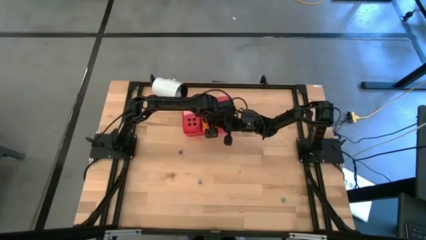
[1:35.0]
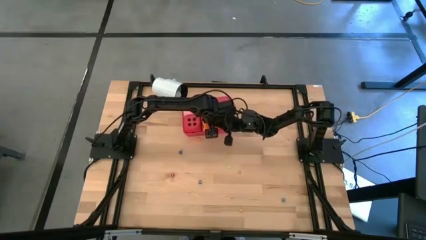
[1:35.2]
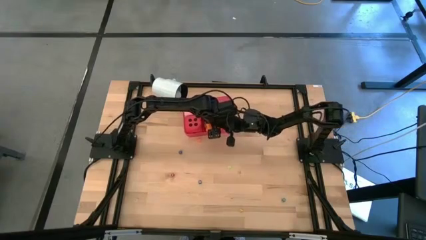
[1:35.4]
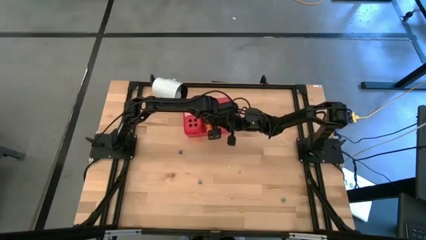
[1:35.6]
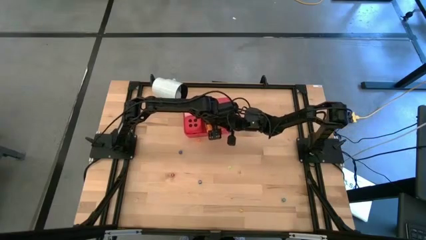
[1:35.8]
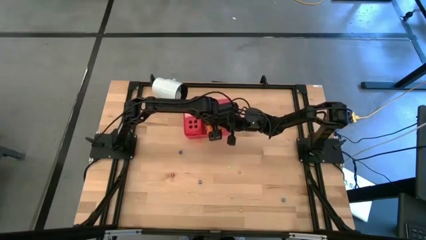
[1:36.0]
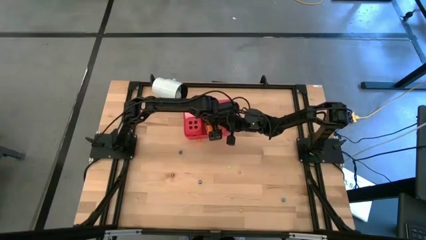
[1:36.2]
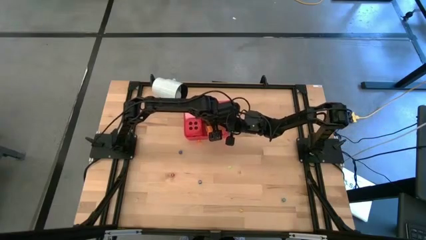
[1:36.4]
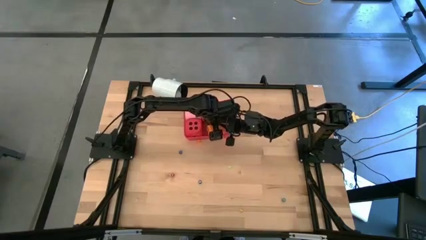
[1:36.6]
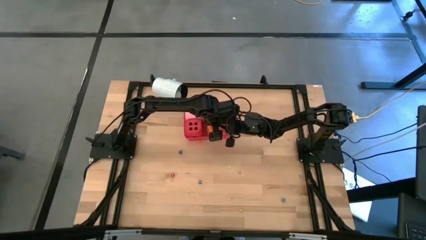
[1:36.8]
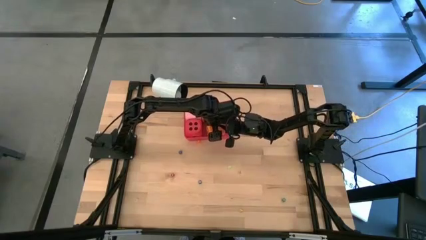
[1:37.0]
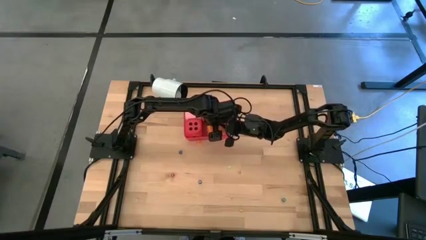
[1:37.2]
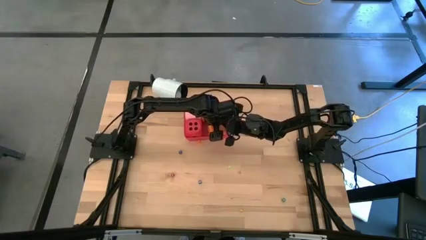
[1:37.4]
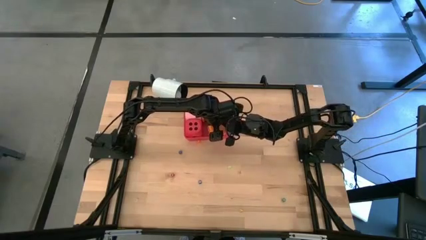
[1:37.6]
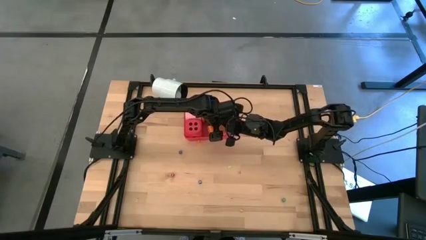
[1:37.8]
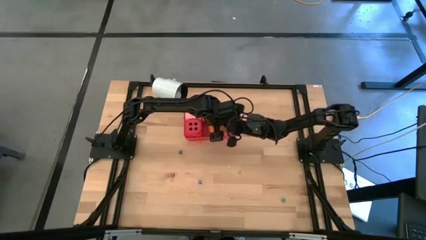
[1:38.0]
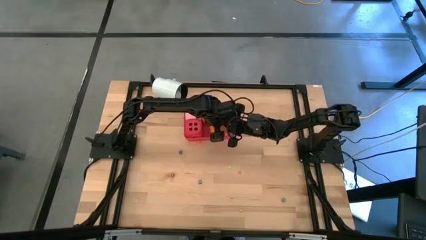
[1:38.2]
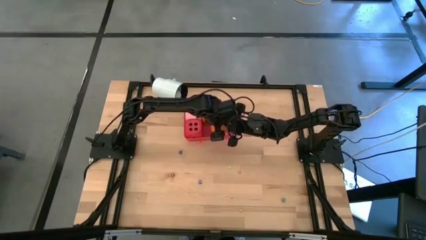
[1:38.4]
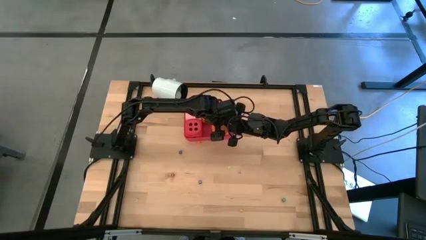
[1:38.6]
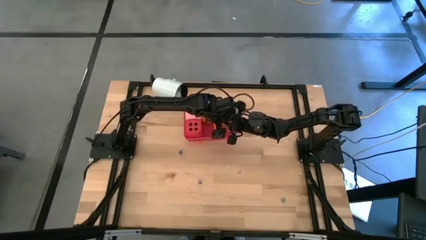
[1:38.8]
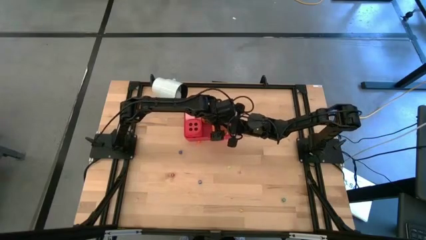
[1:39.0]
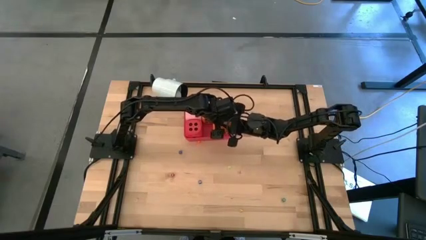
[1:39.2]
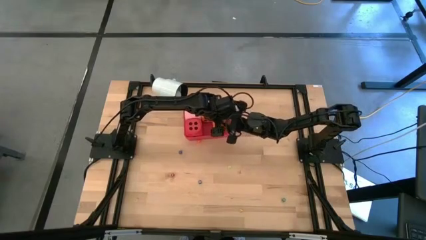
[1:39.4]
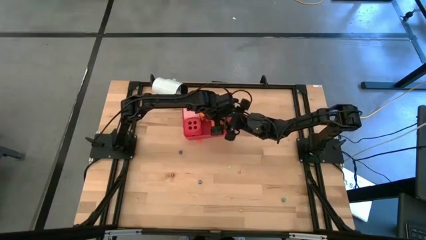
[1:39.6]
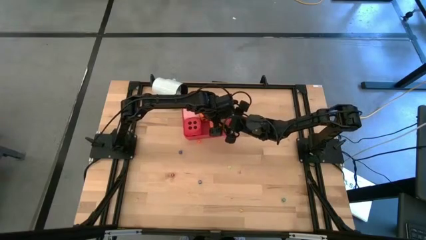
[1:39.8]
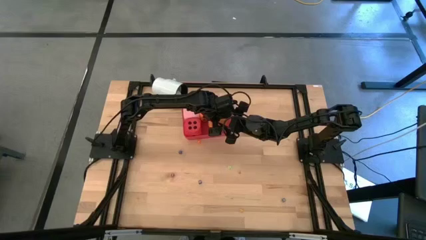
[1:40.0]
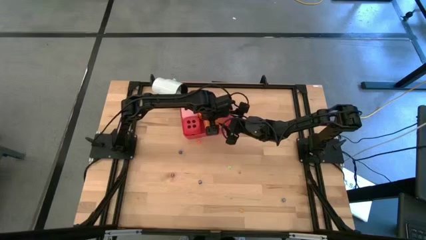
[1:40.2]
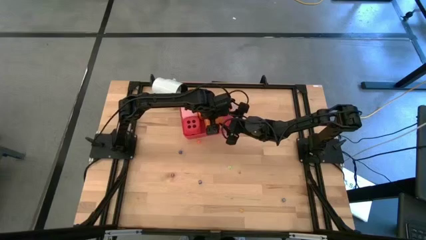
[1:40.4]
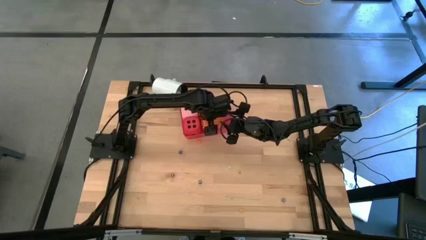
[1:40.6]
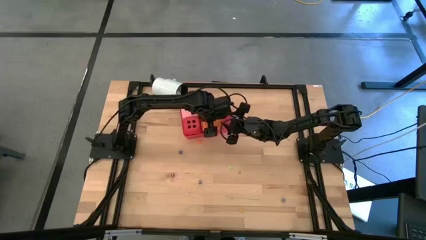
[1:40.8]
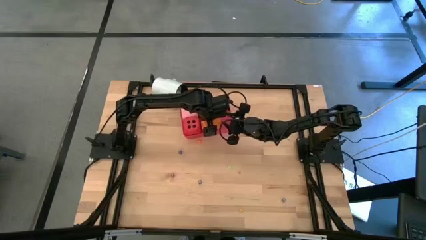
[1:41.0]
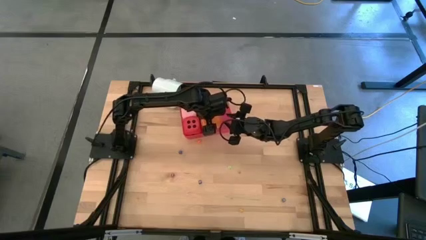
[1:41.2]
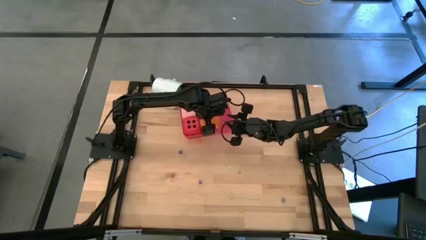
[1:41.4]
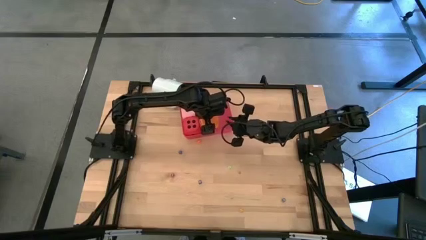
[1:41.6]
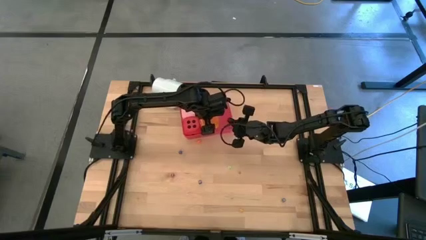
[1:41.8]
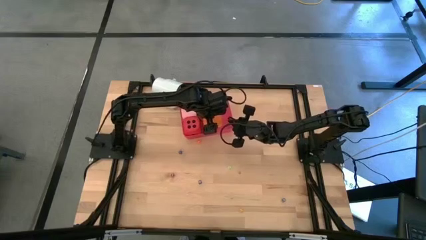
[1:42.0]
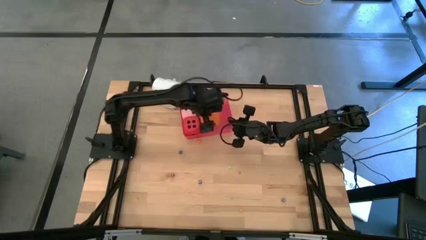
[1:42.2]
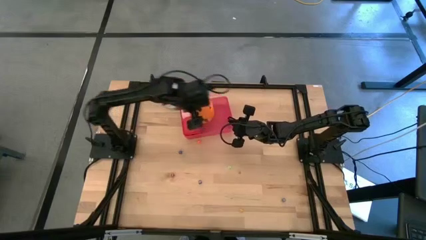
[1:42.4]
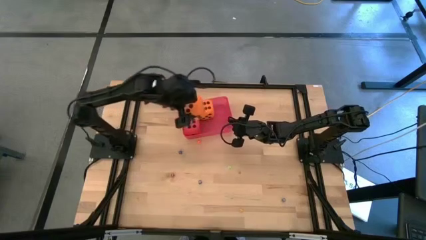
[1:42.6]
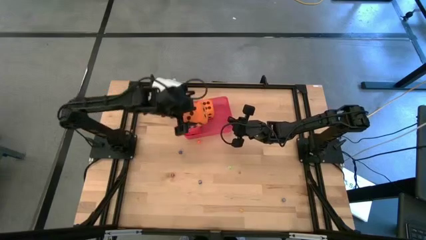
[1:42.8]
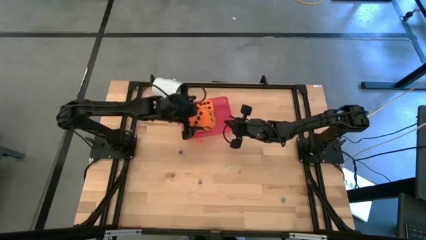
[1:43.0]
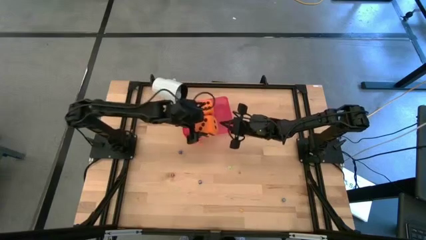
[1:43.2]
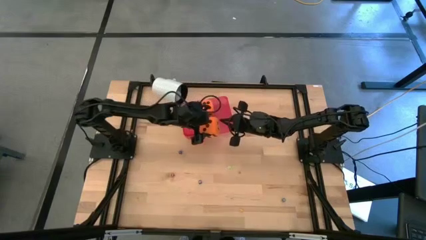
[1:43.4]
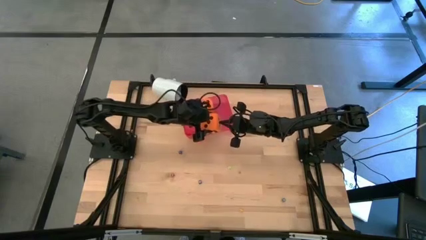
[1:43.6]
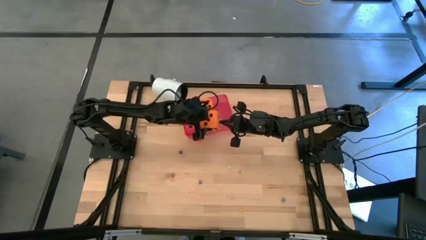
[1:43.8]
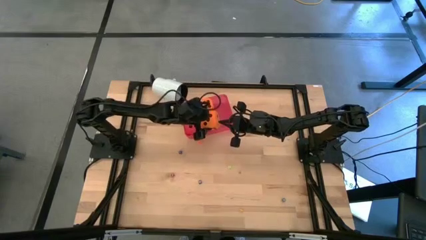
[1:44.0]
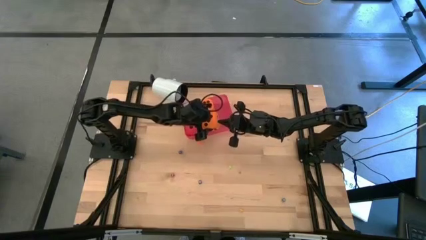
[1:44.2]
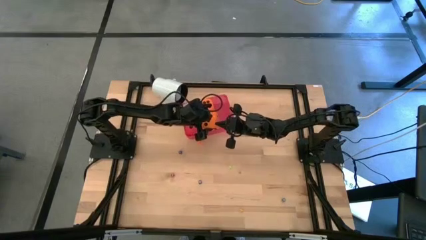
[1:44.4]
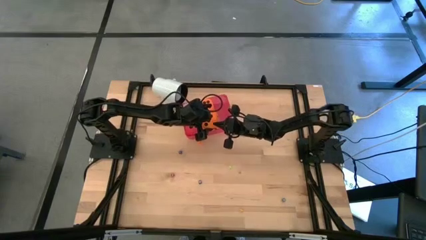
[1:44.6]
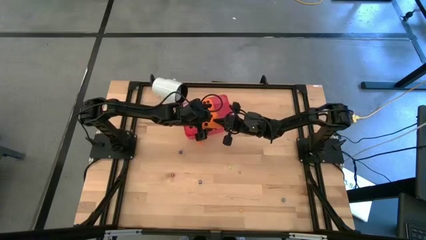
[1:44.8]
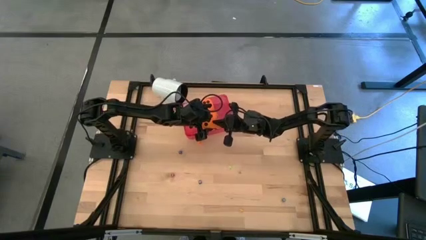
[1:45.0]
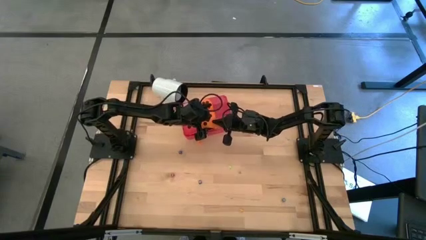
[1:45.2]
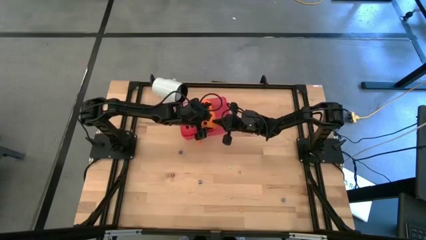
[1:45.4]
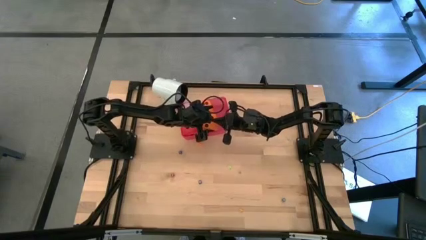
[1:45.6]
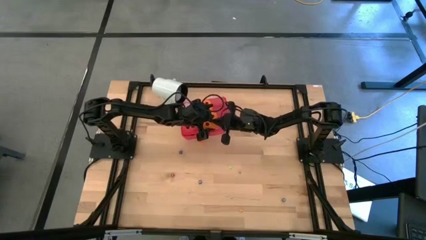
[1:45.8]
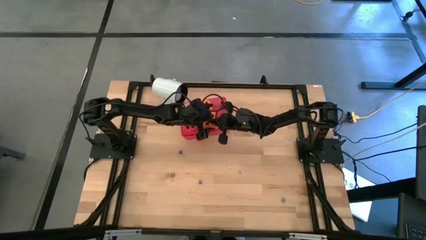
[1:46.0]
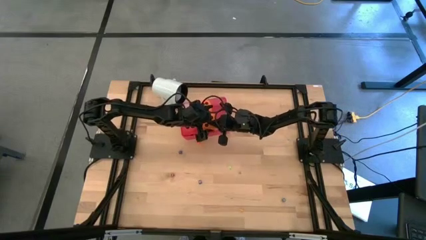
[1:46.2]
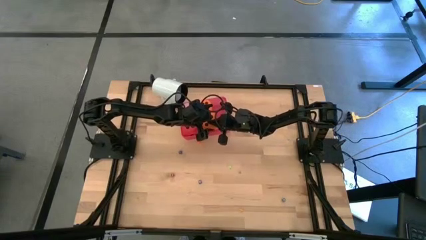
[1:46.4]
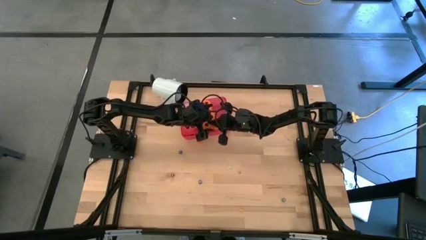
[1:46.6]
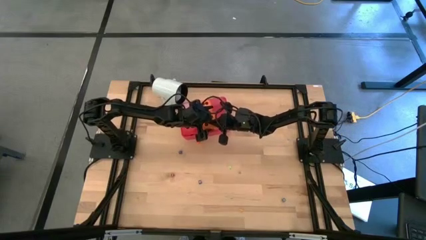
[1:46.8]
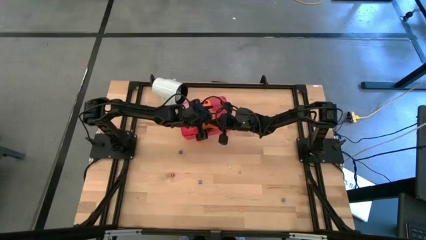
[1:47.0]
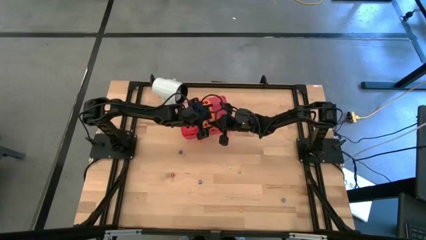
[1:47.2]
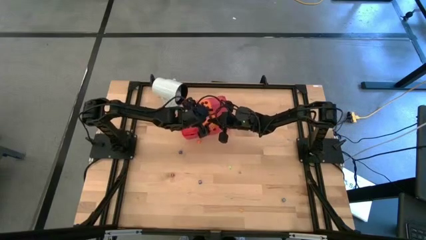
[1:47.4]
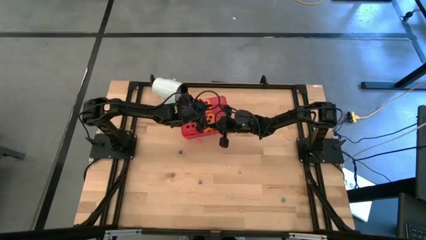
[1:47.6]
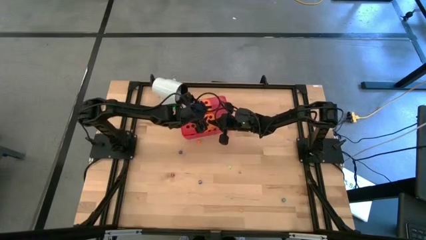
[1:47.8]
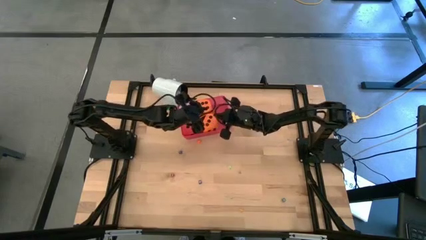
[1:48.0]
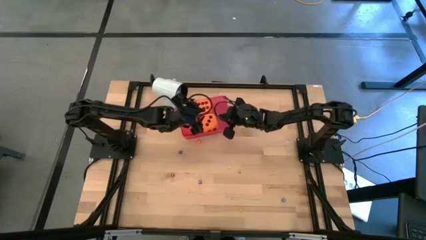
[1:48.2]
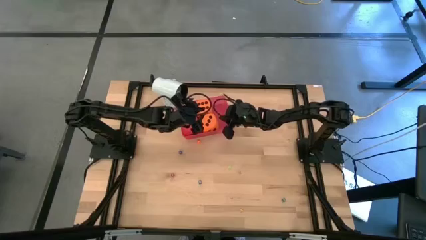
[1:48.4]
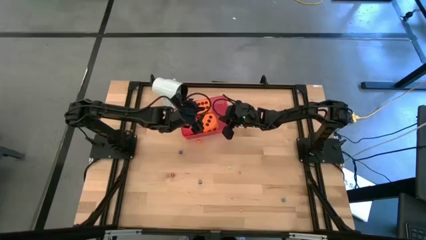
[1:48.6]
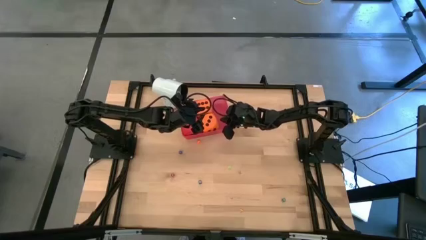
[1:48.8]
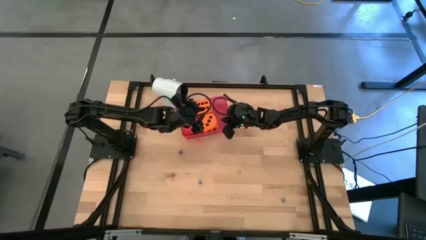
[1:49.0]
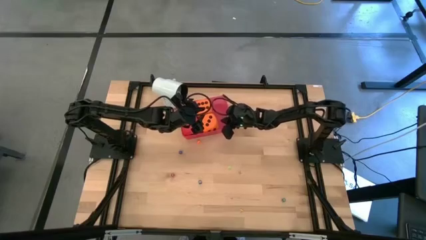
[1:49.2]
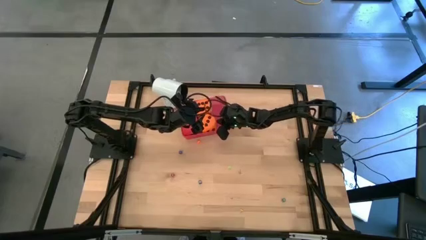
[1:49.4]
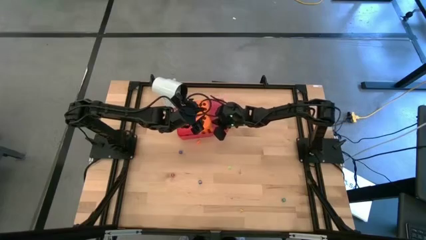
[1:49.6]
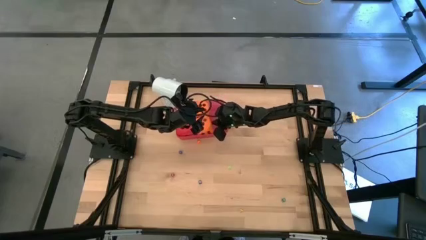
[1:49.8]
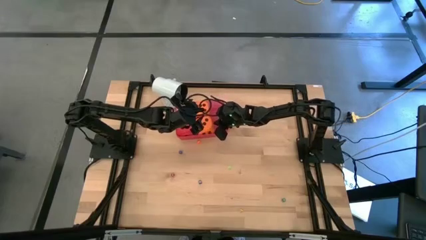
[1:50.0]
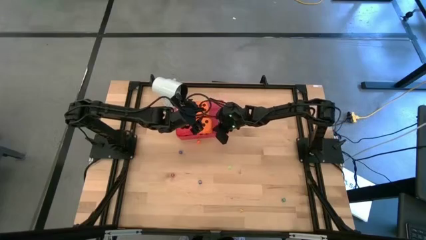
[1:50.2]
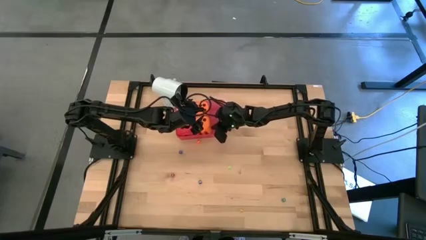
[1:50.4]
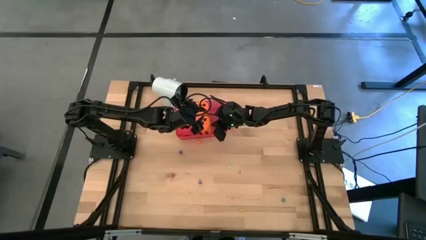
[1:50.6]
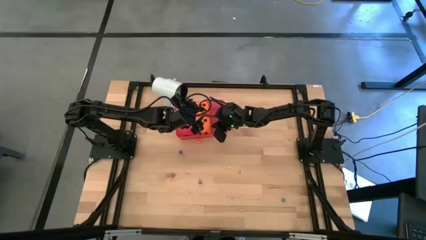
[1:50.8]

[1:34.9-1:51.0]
Task: Pick & Place Dice
Put the big orange dice into the red bin
